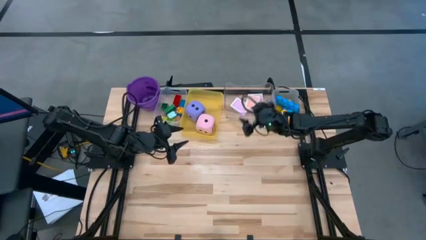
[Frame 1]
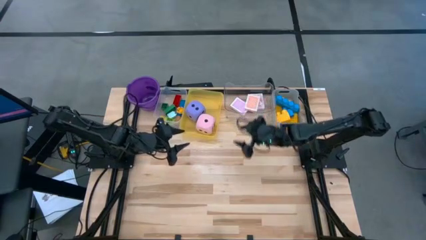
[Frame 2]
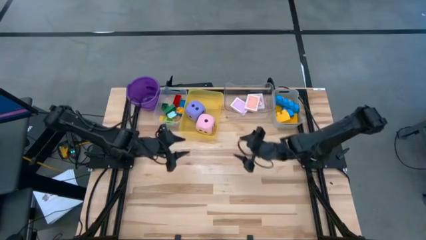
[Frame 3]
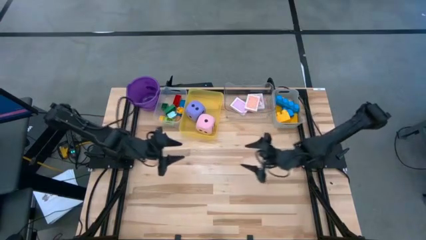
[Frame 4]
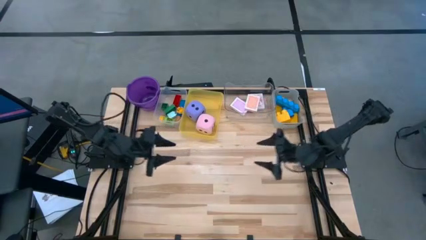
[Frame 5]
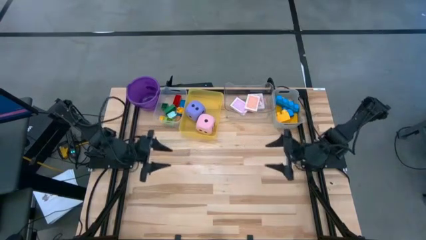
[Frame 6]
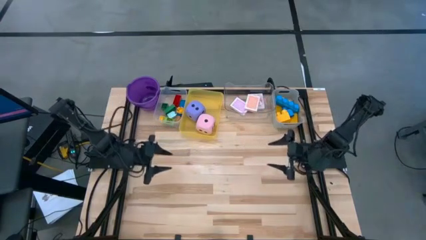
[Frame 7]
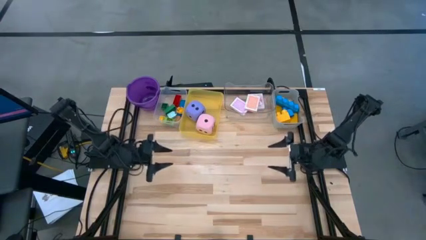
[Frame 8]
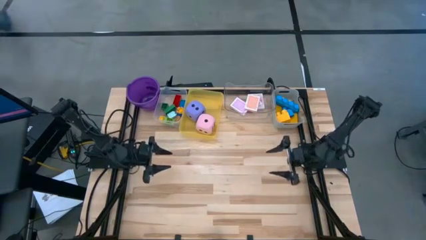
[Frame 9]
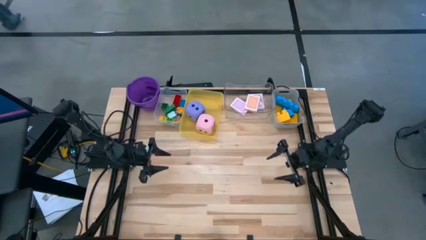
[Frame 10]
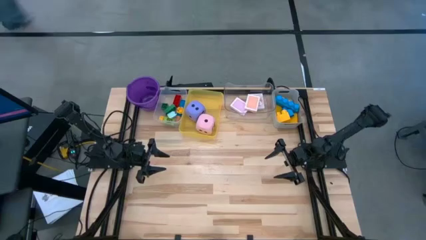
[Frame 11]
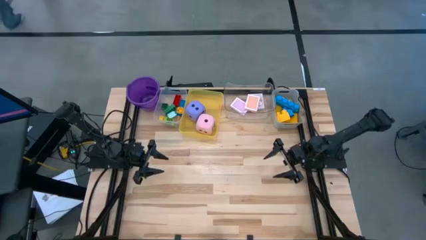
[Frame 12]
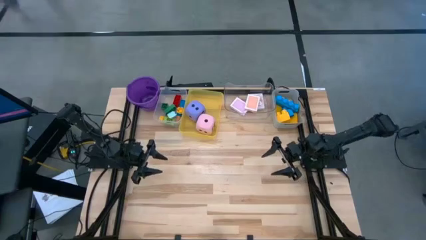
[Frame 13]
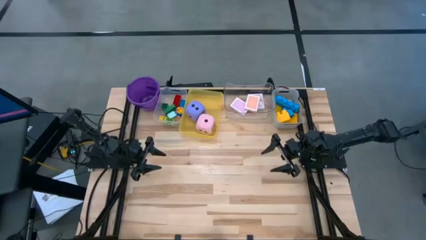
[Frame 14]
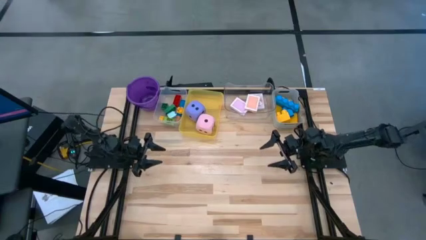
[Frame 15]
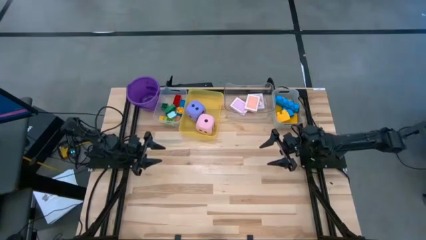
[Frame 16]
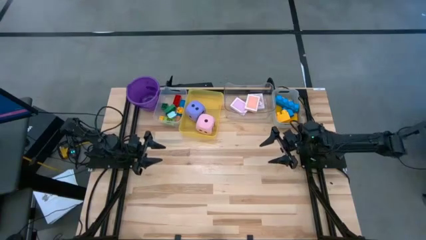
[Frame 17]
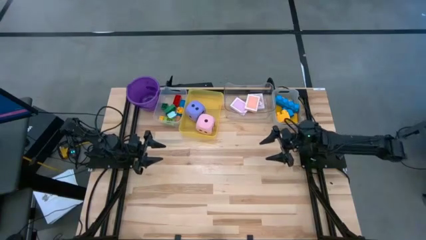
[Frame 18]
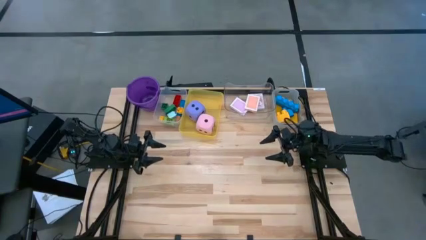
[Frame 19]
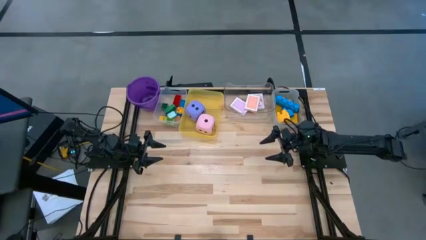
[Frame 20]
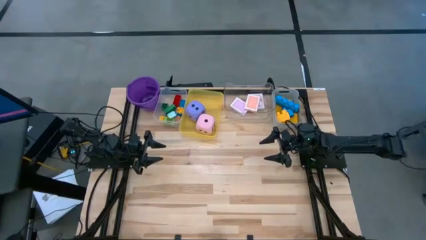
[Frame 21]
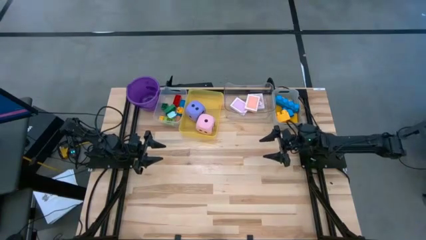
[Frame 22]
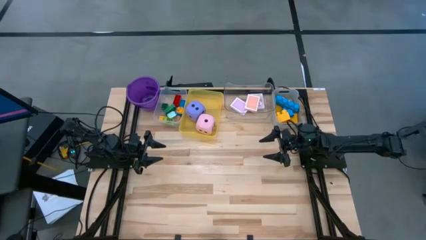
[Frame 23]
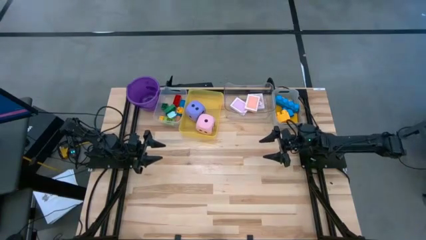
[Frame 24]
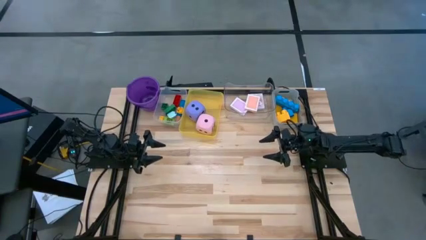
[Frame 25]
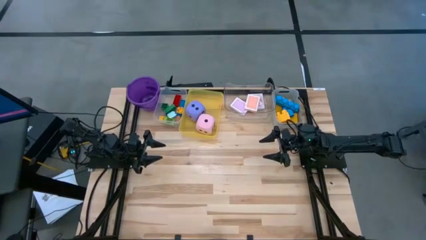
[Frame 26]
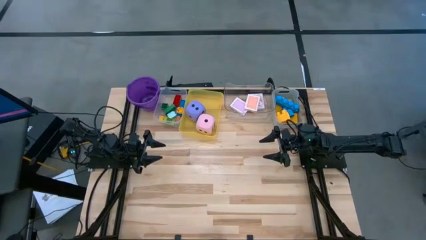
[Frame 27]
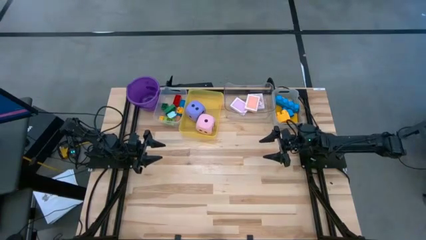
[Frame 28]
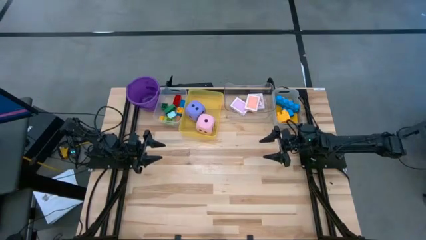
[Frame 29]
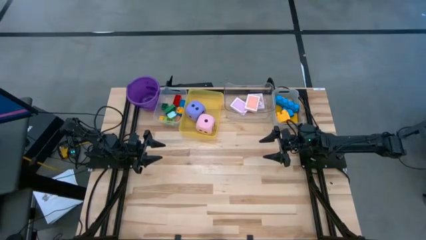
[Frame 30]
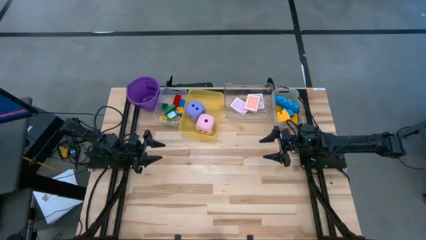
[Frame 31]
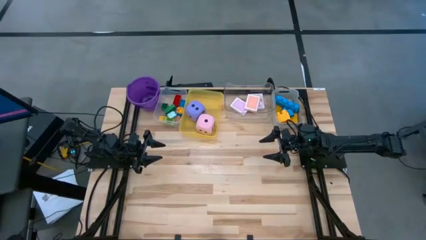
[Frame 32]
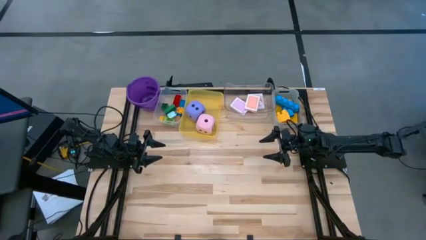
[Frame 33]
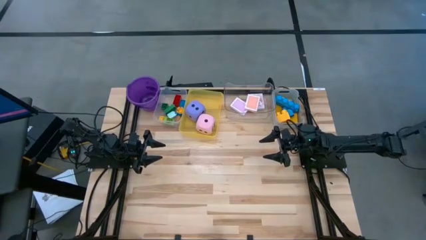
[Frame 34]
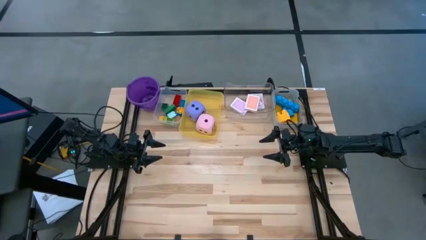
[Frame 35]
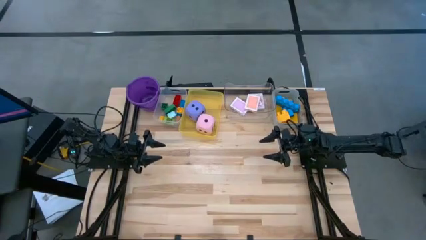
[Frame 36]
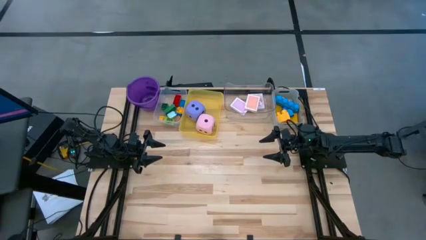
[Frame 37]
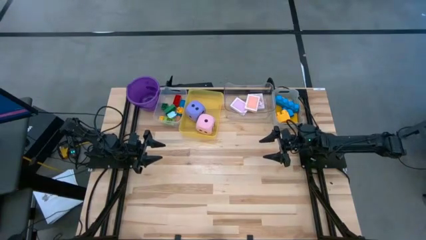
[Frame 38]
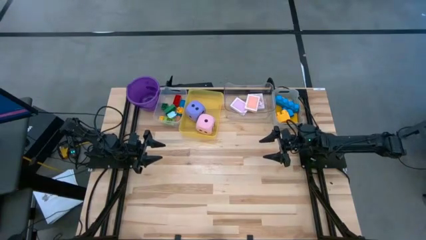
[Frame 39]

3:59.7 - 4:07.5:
Task: Pick & Place Toys
Return to Home Position

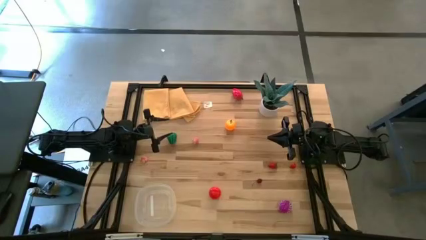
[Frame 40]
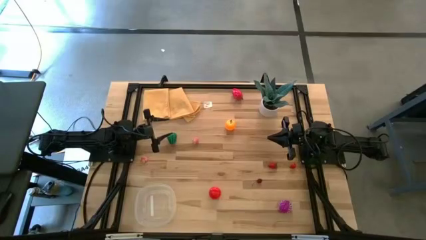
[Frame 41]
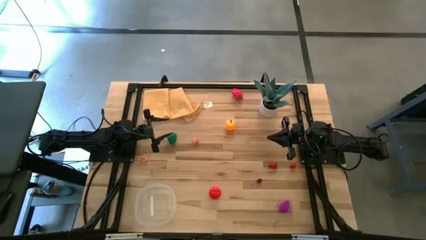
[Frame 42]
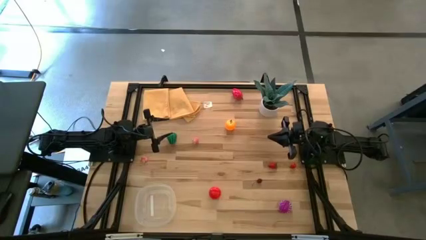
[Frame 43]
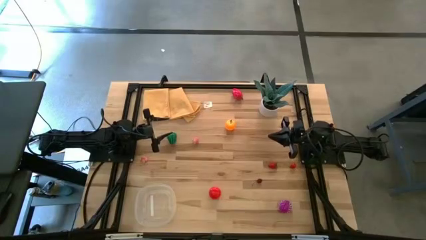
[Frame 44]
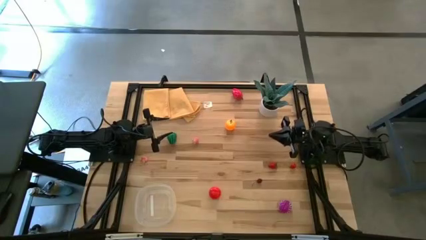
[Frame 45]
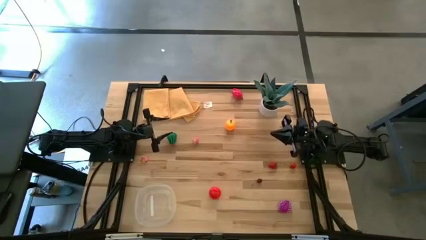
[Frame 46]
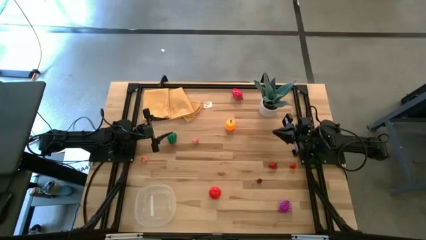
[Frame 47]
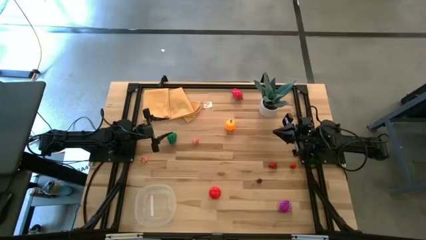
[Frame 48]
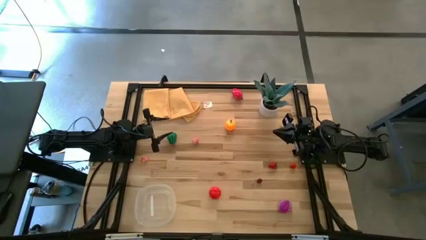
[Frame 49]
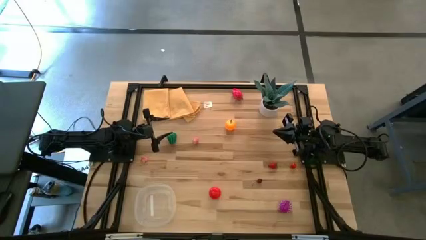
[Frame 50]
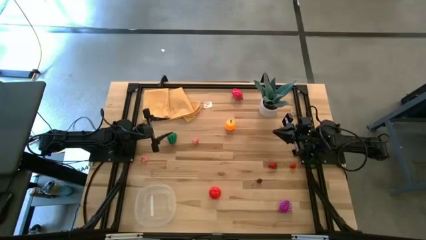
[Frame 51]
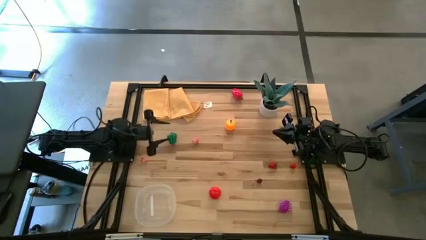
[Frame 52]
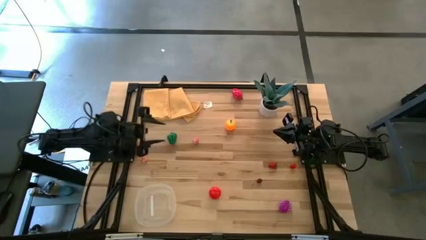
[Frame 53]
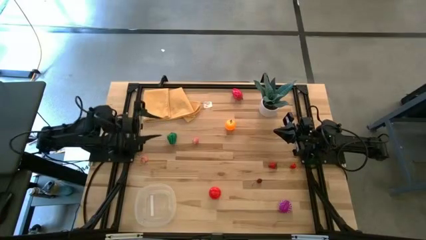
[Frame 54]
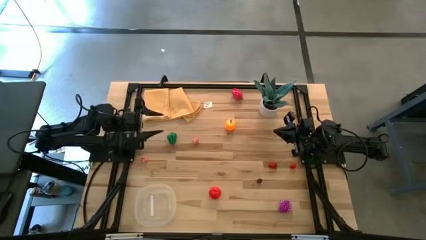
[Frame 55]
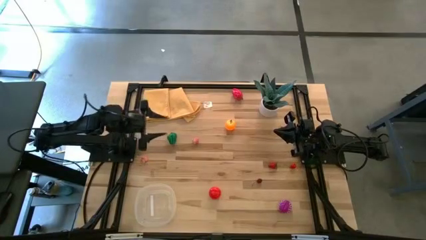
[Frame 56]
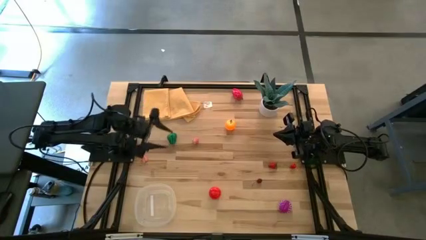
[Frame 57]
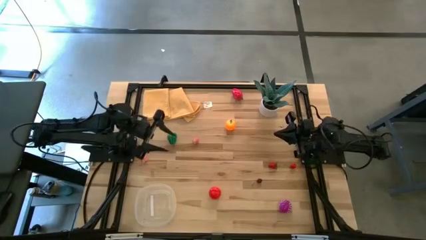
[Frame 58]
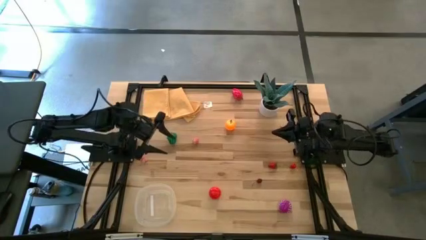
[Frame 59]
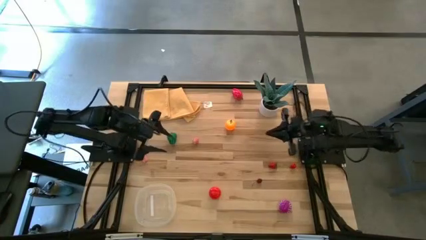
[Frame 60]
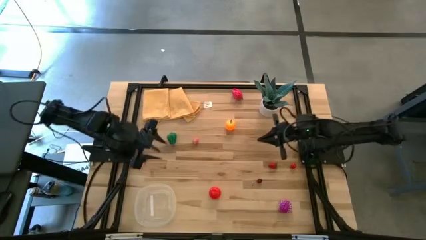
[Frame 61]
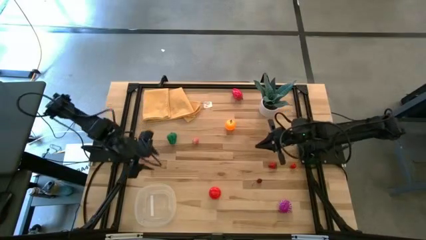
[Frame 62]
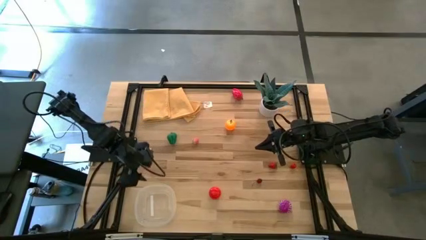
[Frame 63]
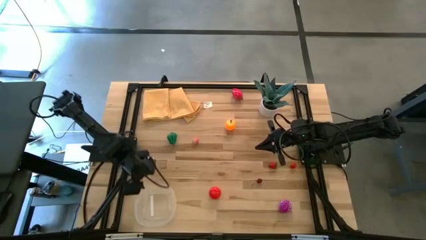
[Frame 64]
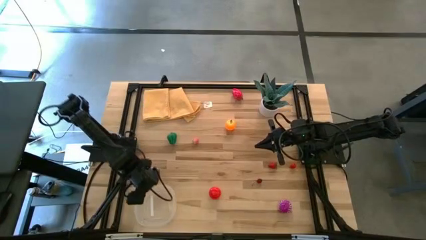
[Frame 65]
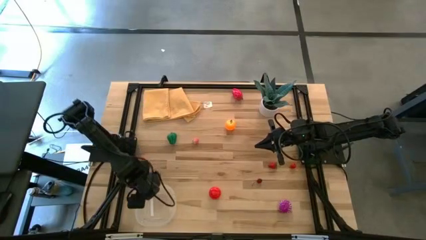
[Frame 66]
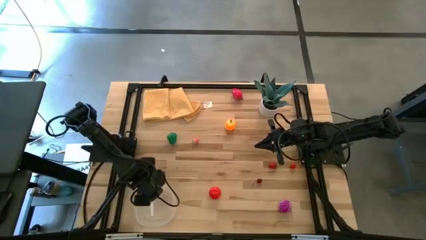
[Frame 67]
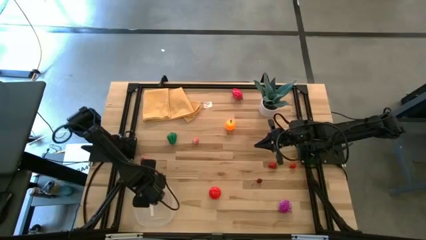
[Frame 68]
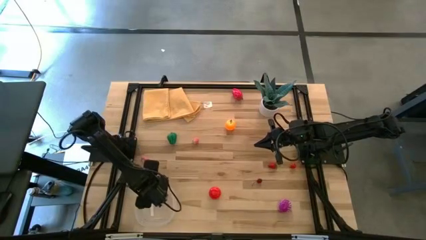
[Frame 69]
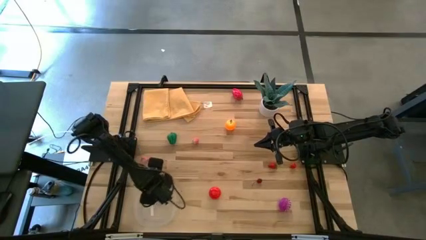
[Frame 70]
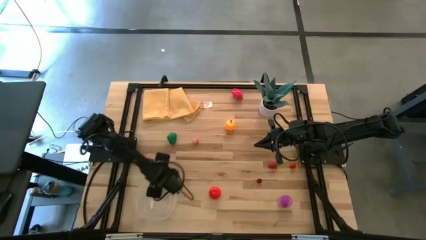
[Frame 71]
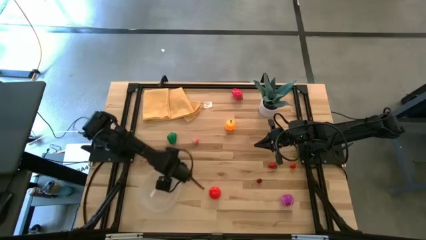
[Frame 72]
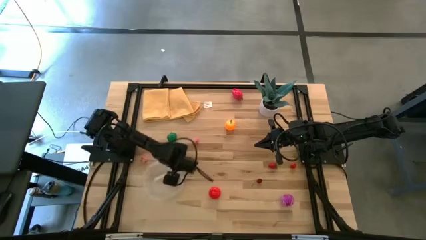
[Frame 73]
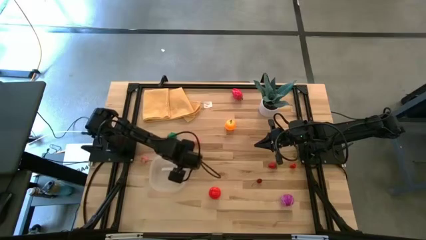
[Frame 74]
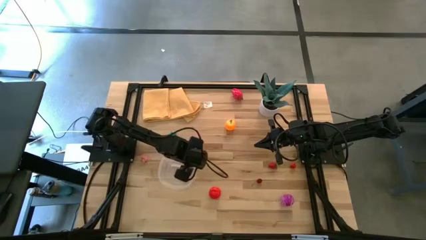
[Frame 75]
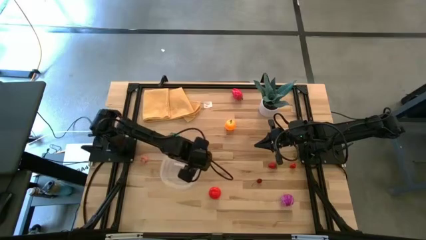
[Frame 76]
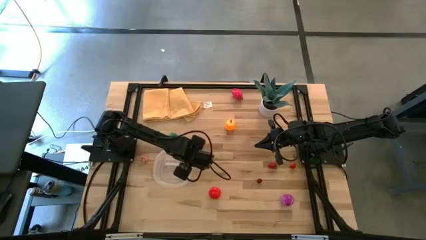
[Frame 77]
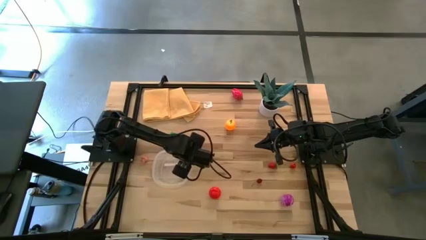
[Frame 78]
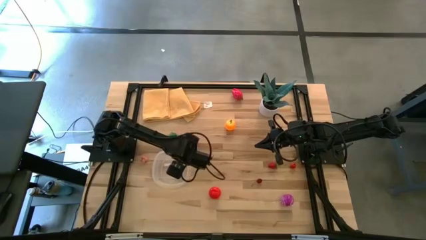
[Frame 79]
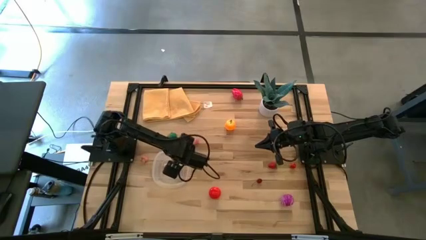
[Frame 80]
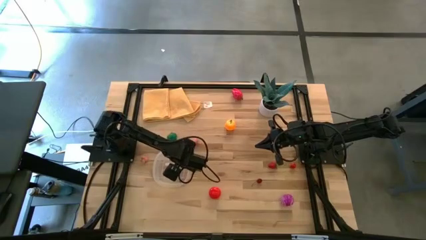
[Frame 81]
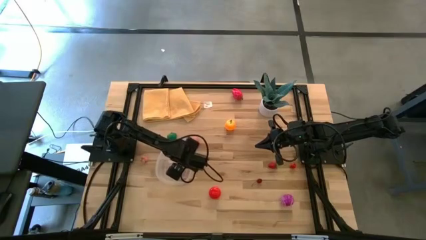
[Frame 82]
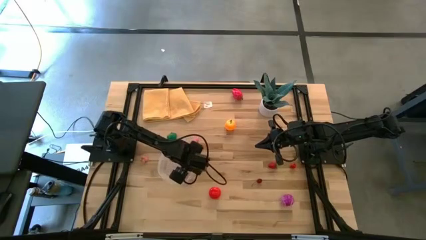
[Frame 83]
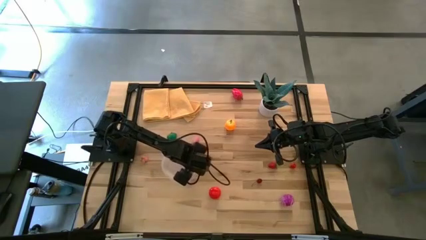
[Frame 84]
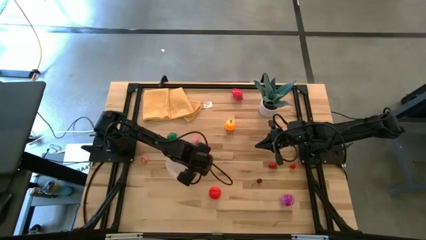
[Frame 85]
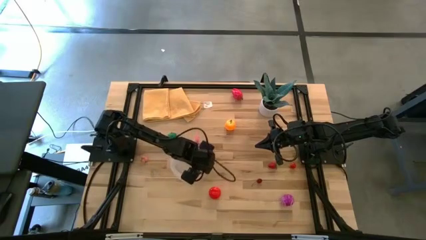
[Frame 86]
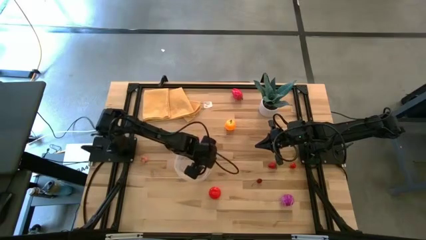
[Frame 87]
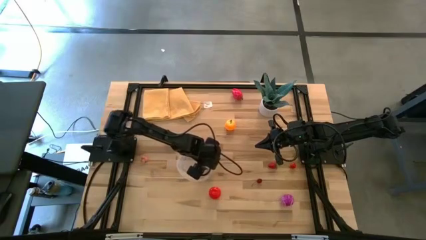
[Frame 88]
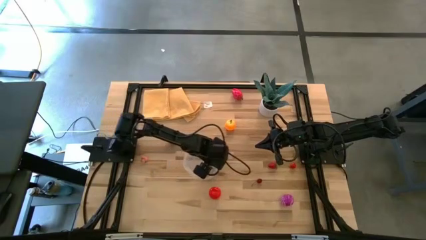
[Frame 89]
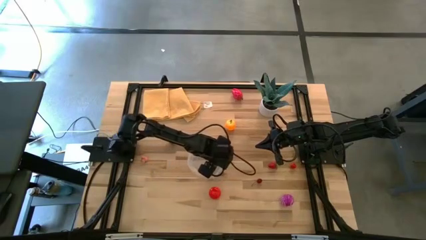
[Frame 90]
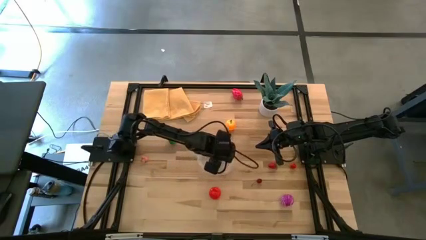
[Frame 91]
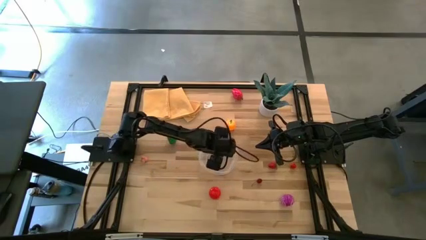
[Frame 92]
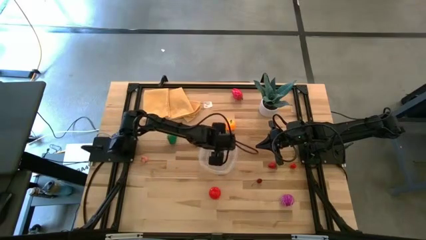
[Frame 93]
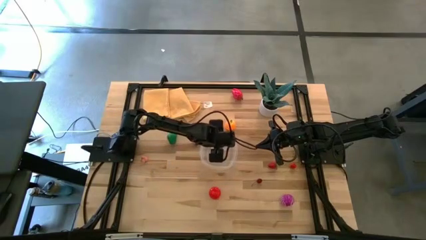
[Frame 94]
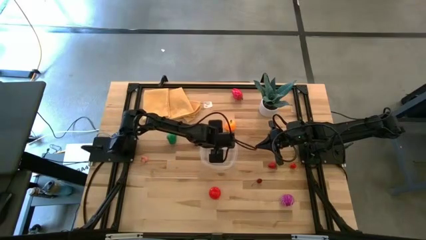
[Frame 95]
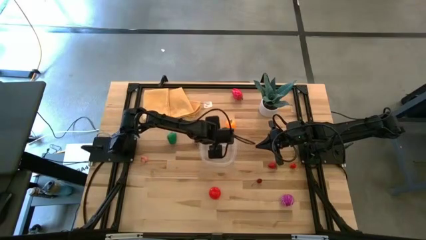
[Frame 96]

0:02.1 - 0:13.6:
Task: Pick and placing Produce into tupperware
Move the transparent bin to the center of the table
